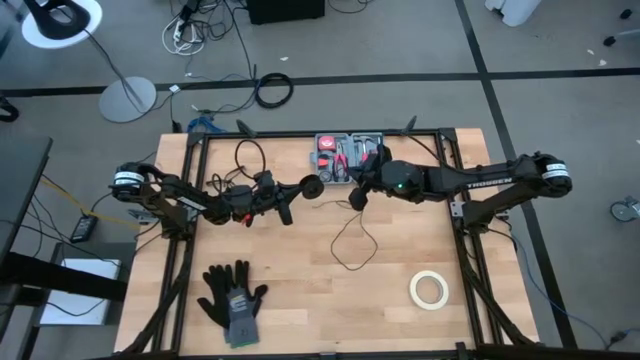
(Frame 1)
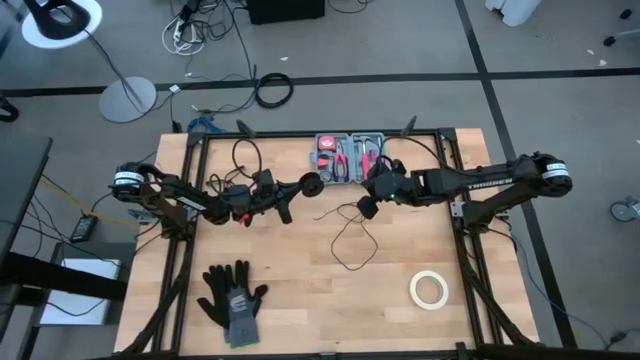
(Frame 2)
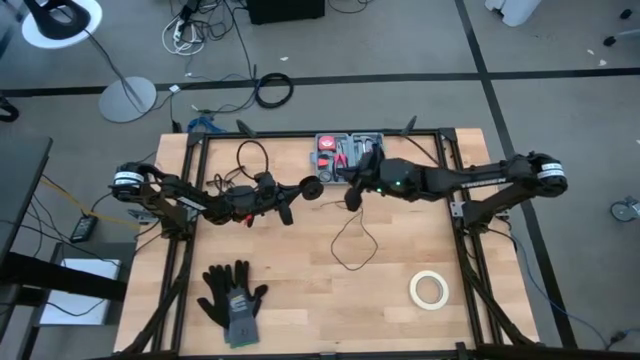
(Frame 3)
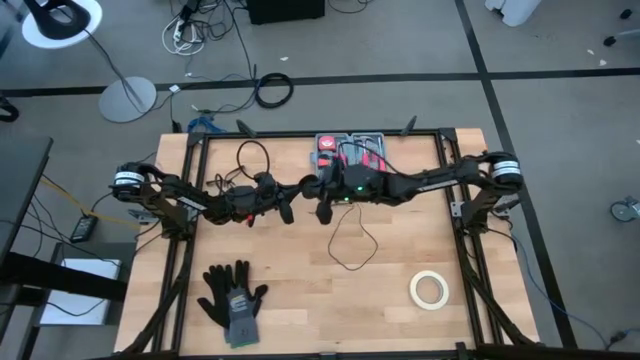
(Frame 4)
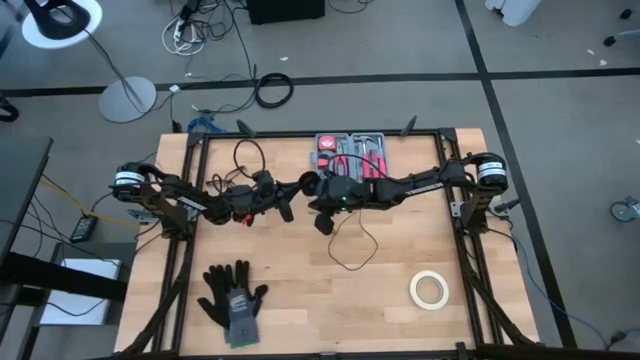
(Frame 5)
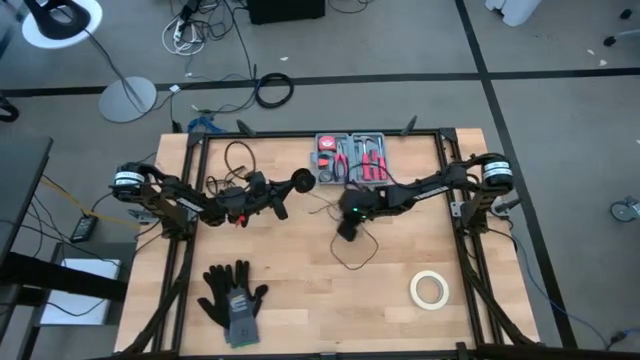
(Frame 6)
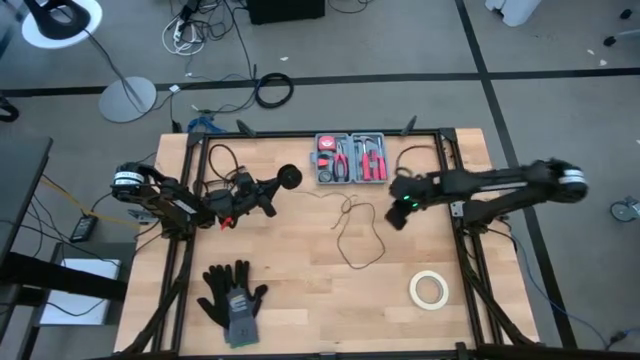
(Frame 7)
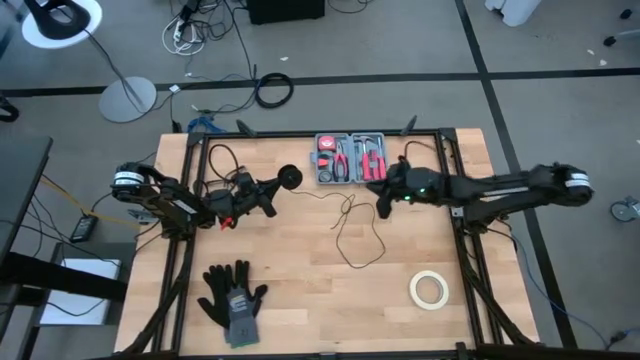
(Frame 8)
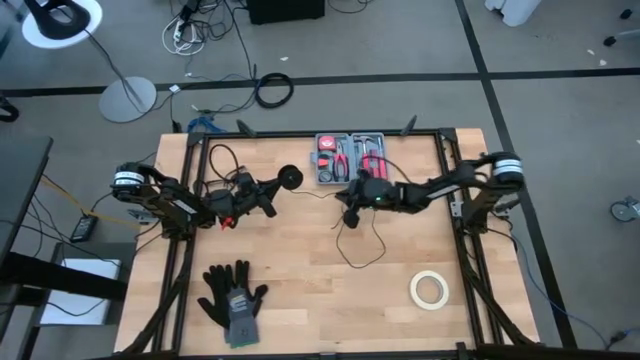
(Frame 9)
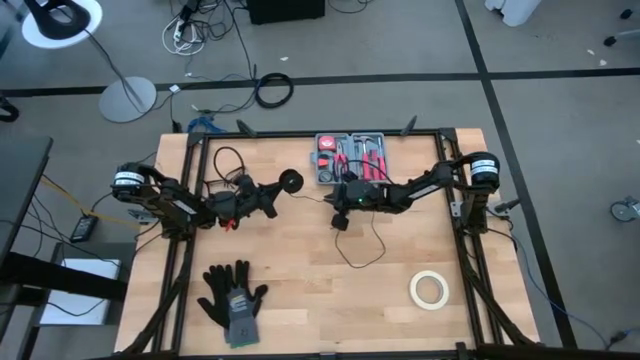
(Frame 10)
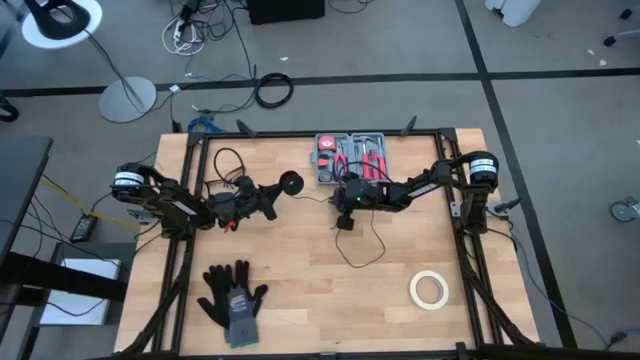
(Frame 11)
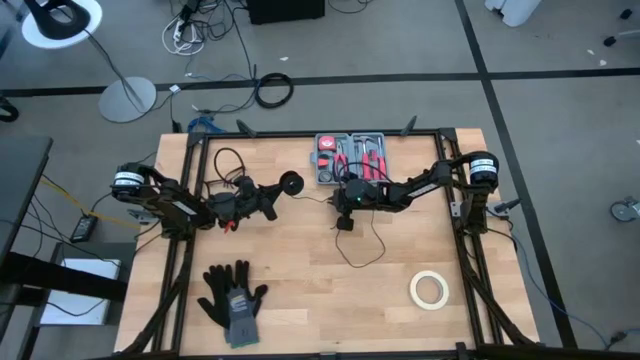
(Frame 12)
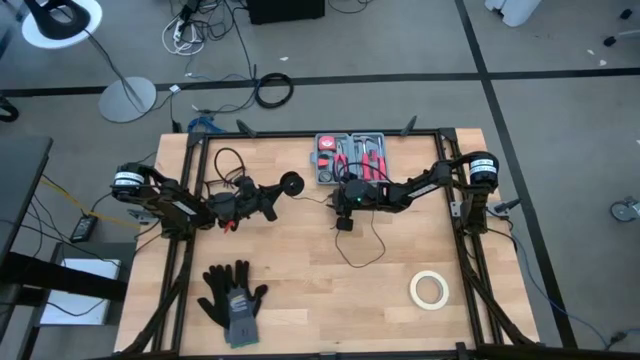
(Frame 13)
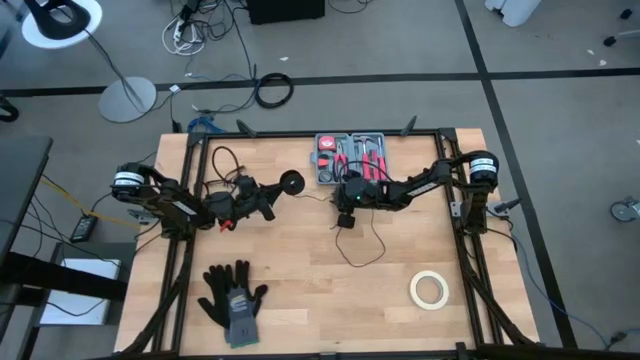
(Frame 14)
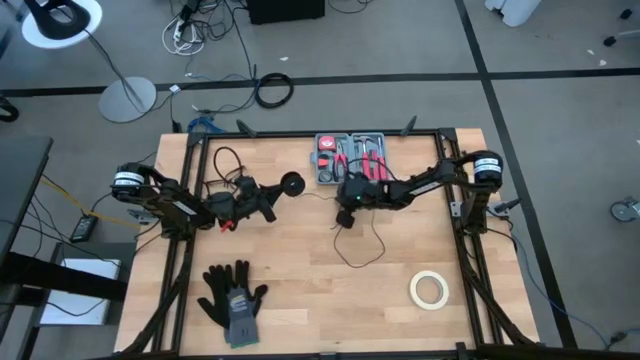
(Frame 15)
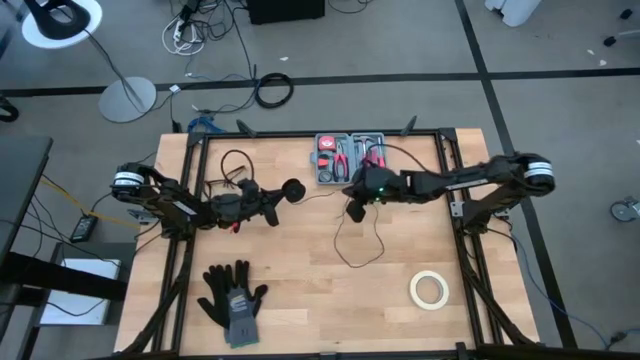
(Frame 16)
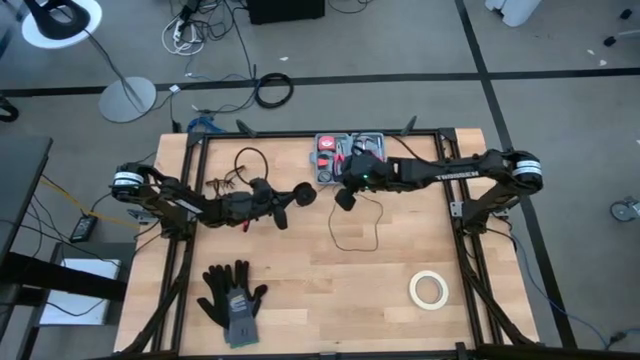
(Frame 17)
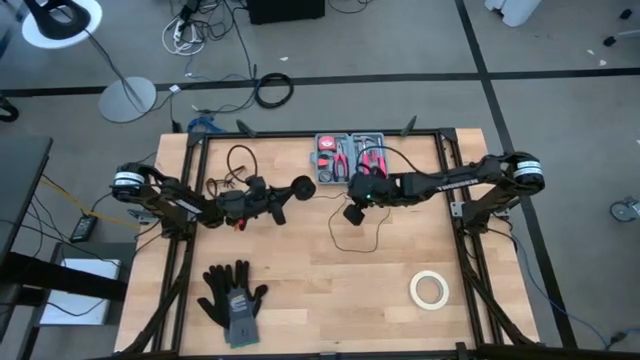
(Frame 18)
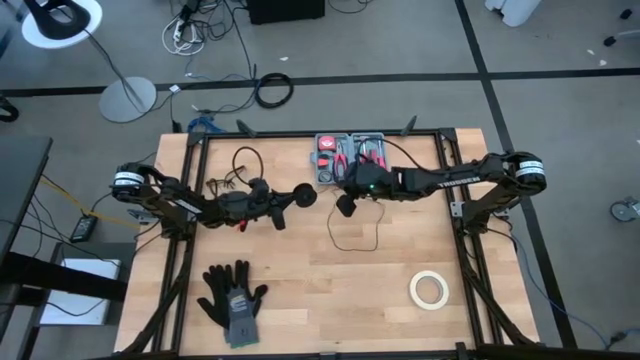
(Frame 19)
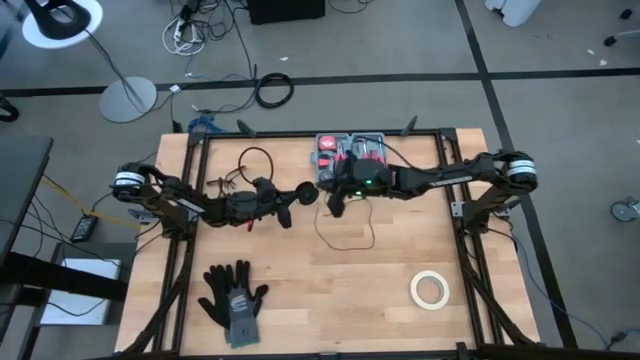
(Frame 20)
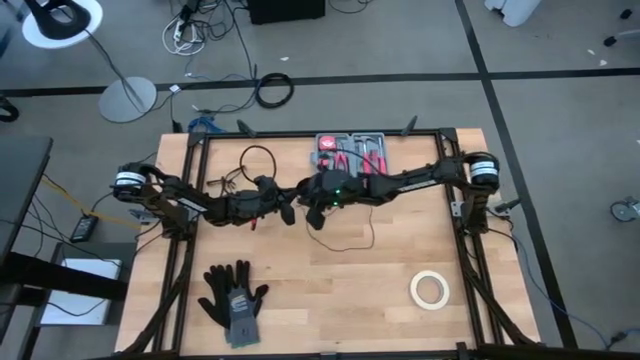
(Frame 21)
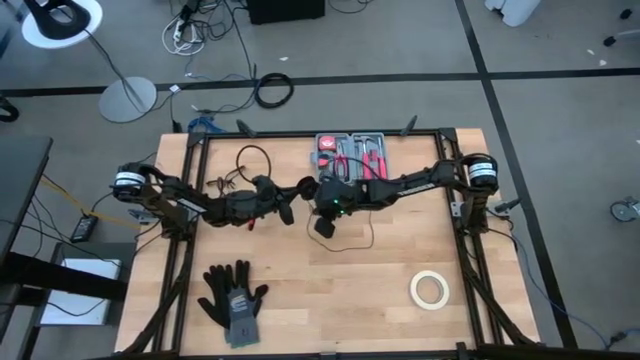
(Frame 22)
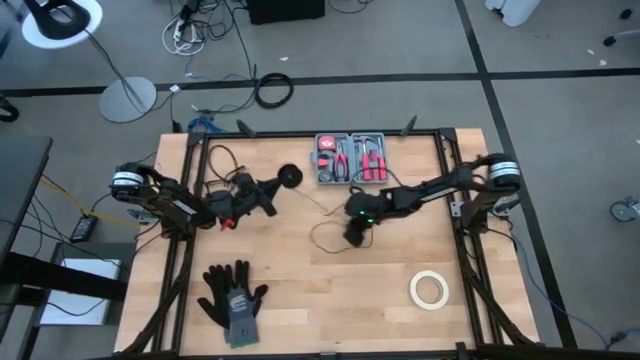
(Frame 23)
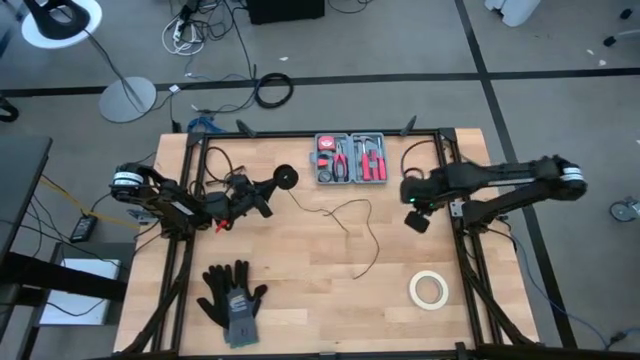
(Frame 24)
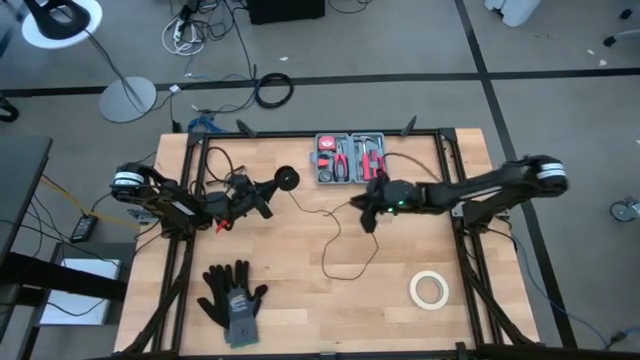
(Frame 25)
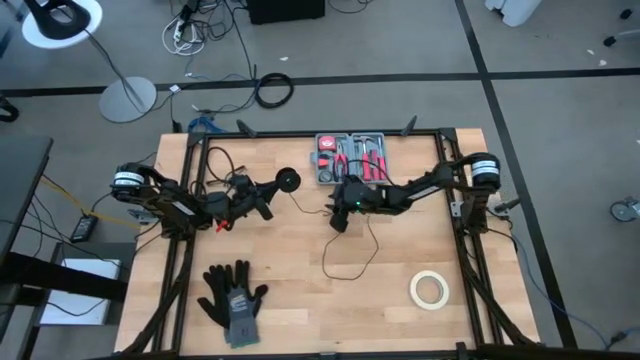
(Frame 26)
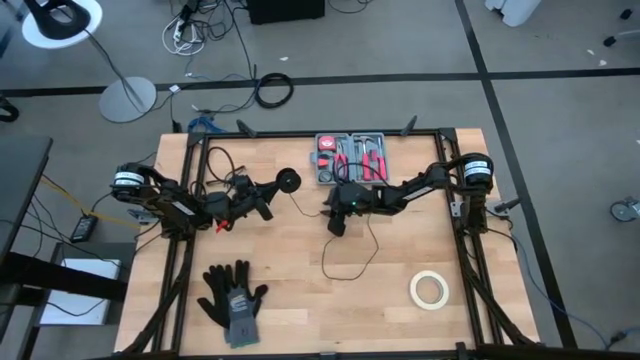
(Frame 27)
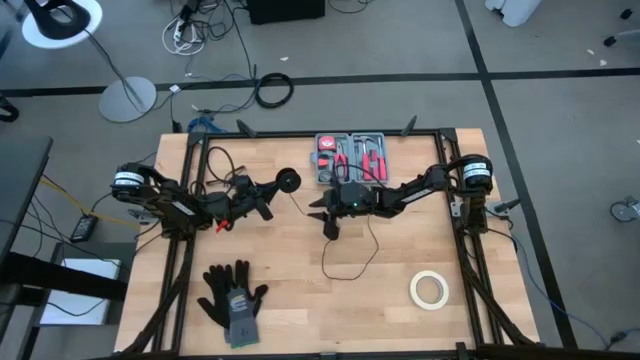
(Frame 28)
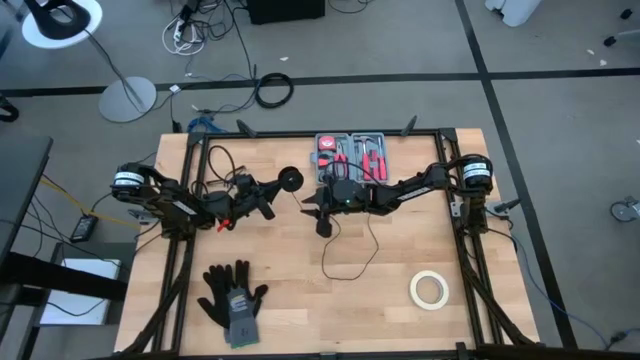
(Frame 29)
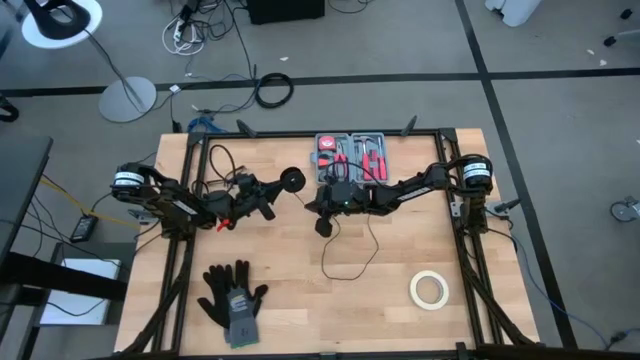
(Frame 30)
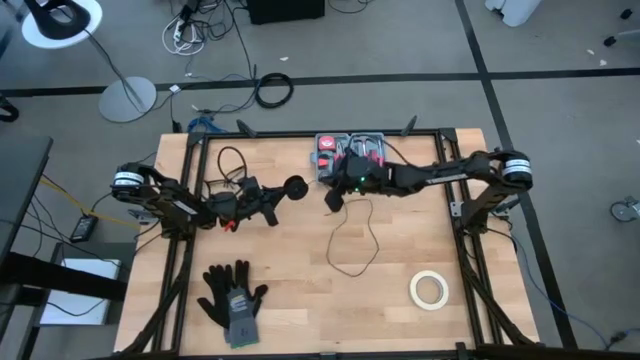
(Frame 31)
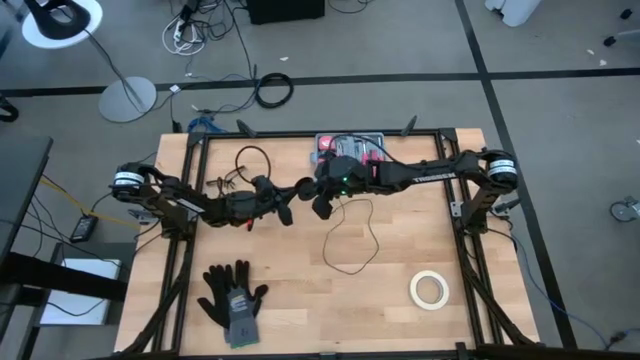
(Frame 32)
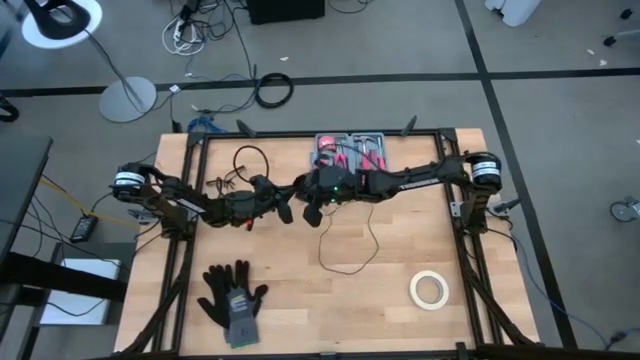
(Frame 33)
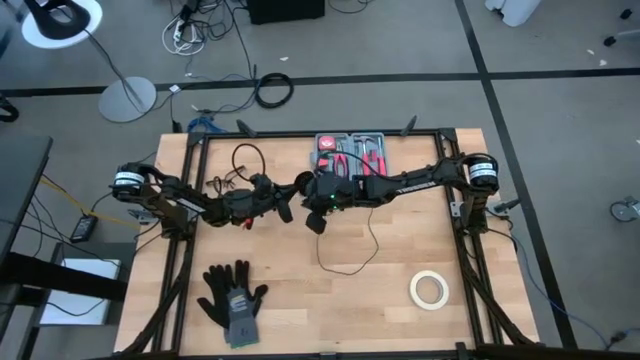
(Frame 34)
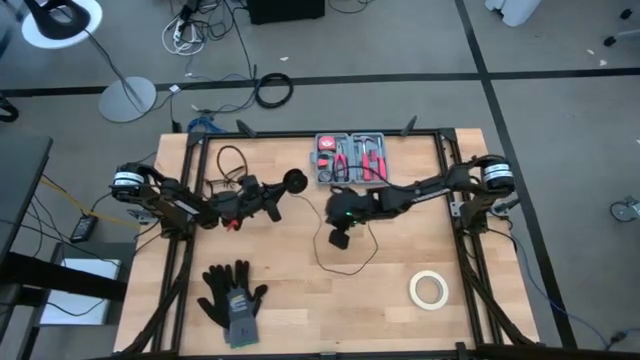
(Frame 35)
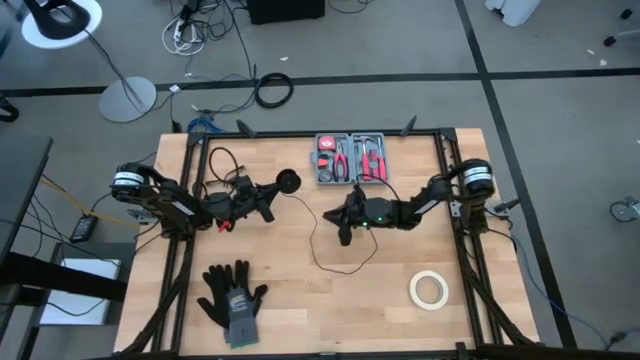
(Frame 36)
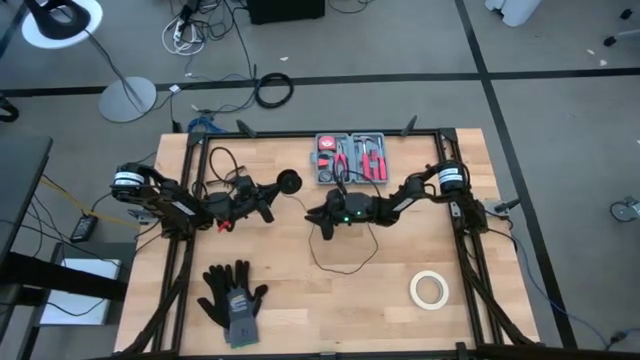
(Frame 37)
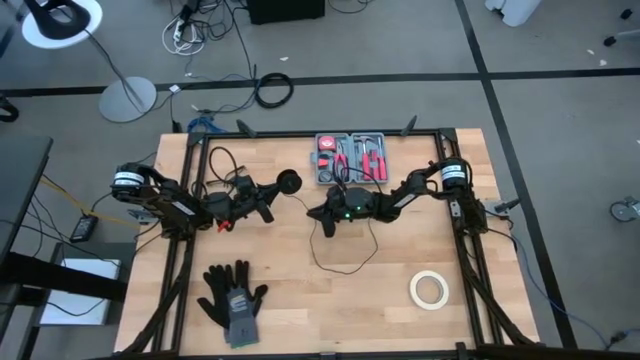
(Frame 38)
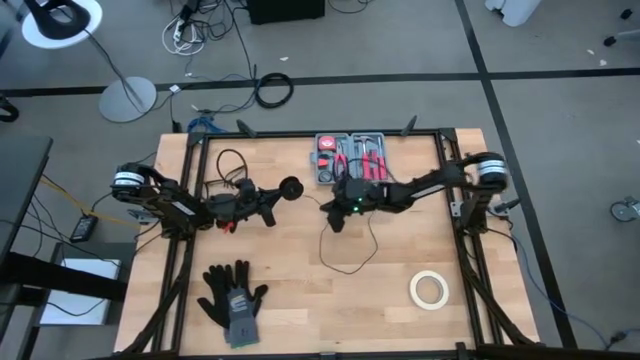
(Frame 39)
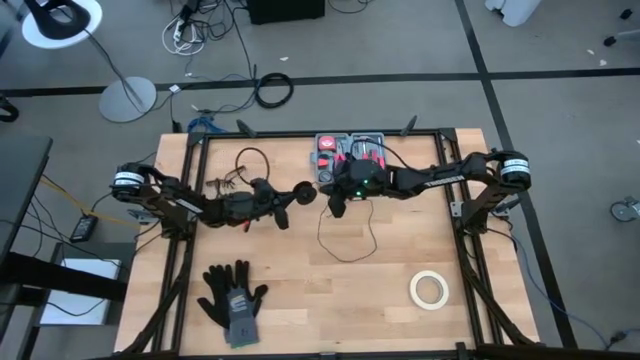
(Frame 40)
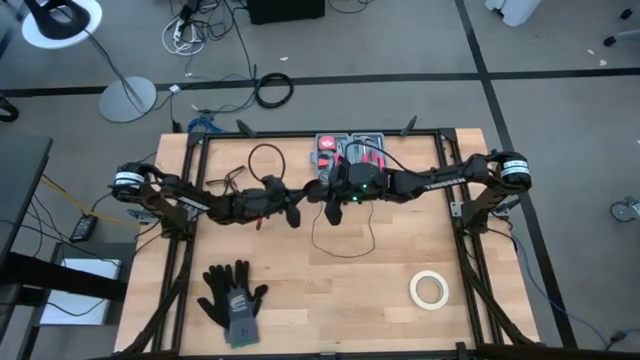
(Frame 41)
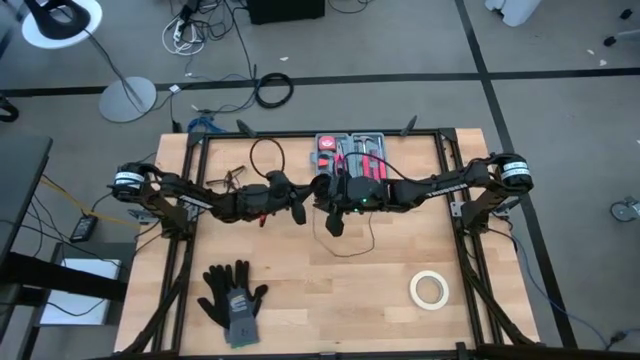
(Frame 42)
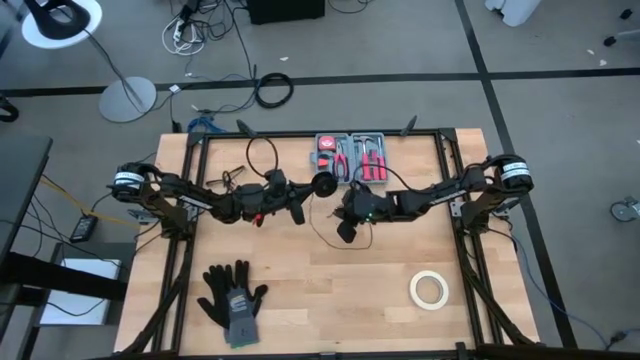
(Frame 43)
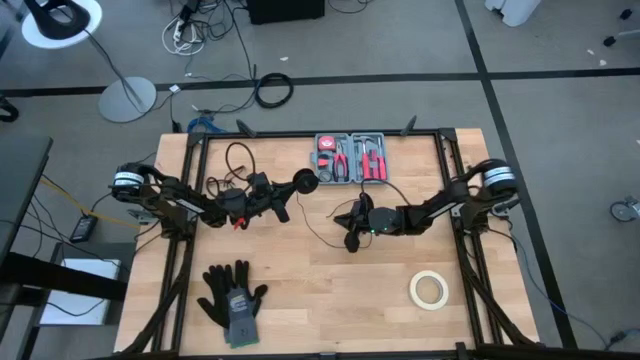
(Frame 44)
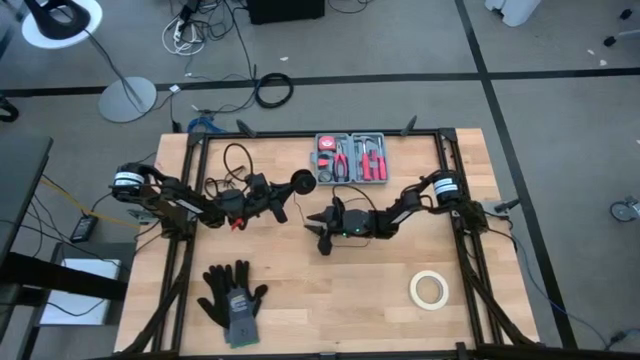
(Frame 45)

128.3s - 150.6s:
Task: Coil cords
Coil the black wire onto the black spool
